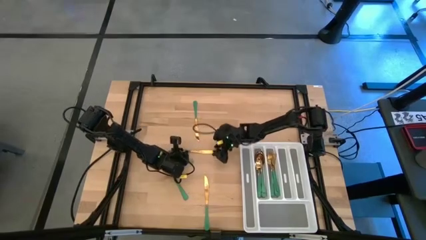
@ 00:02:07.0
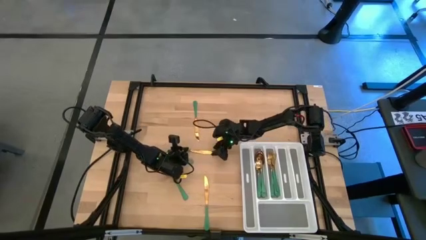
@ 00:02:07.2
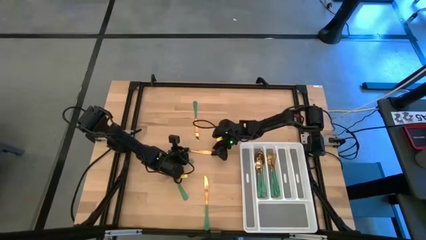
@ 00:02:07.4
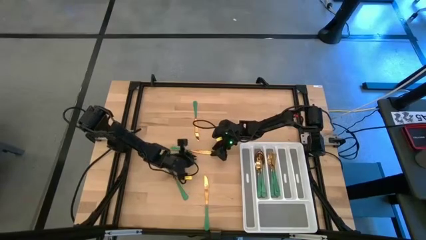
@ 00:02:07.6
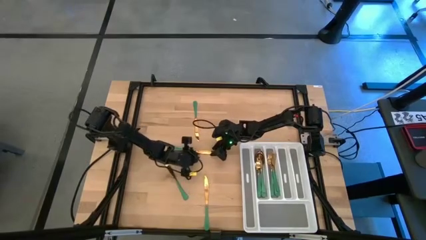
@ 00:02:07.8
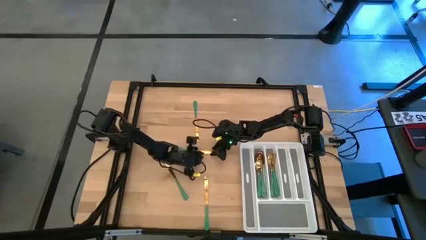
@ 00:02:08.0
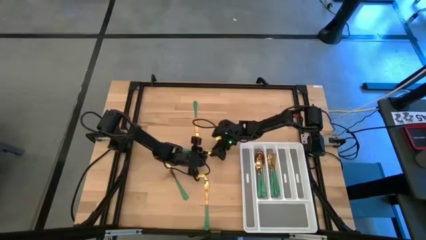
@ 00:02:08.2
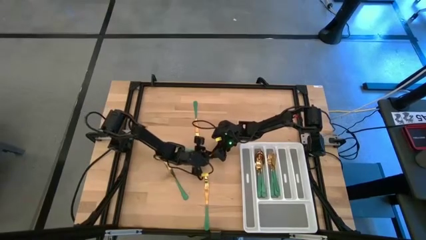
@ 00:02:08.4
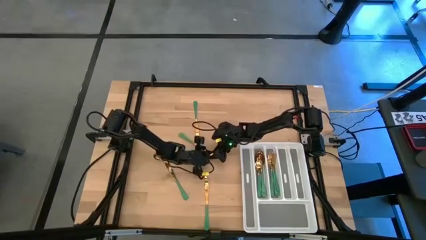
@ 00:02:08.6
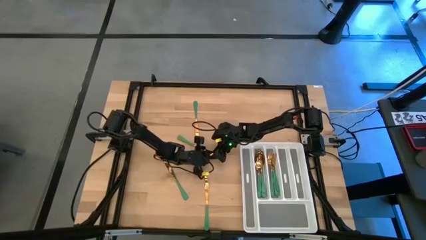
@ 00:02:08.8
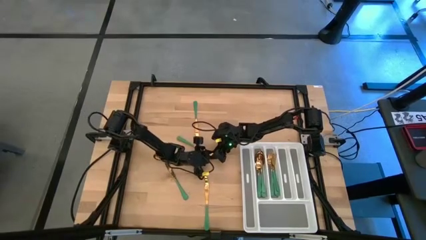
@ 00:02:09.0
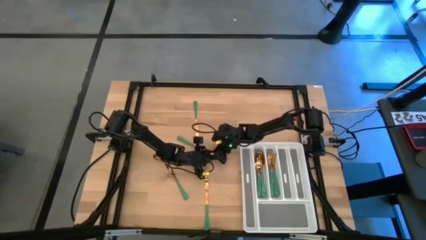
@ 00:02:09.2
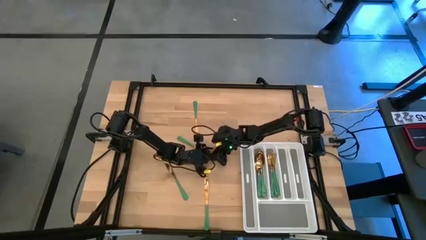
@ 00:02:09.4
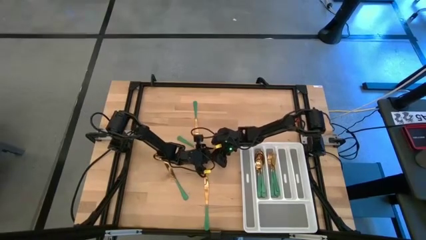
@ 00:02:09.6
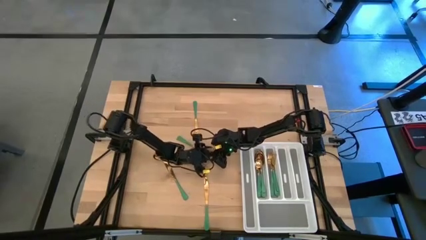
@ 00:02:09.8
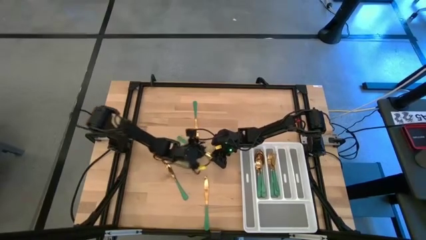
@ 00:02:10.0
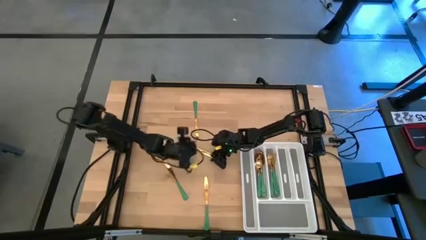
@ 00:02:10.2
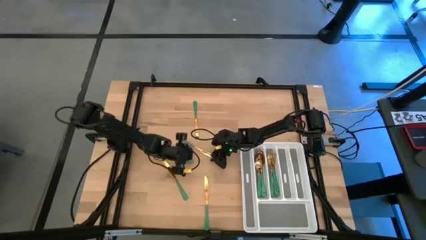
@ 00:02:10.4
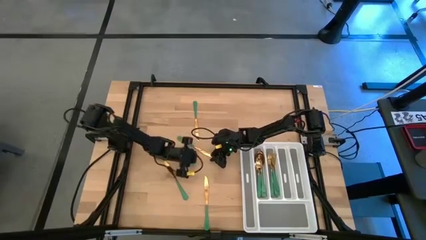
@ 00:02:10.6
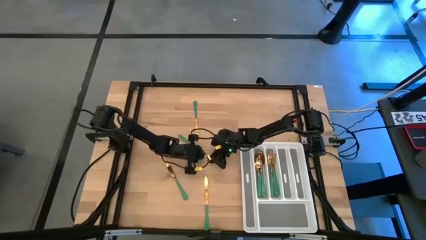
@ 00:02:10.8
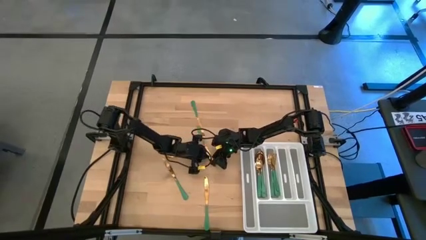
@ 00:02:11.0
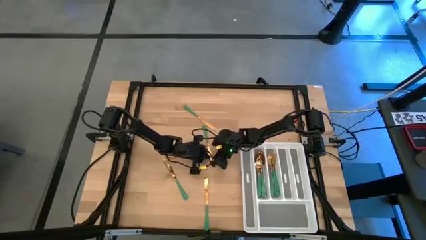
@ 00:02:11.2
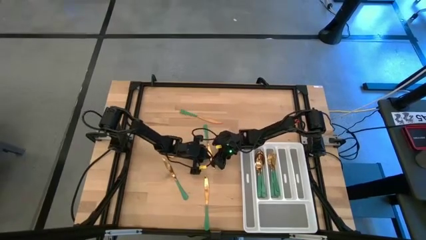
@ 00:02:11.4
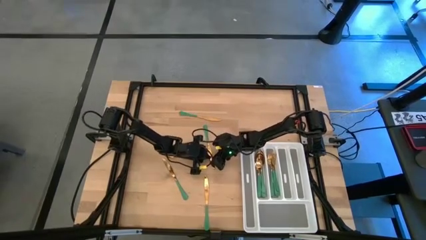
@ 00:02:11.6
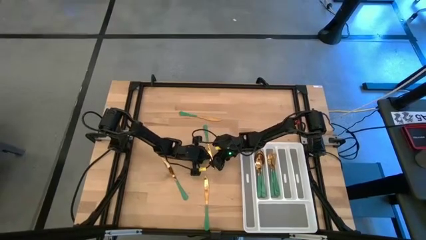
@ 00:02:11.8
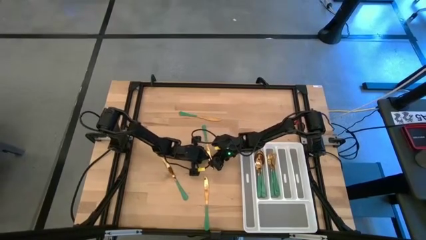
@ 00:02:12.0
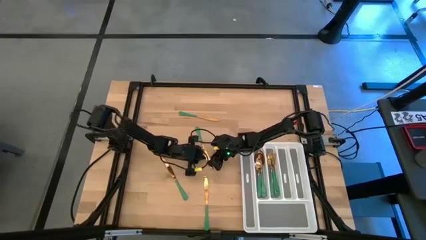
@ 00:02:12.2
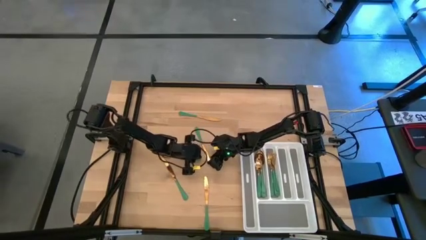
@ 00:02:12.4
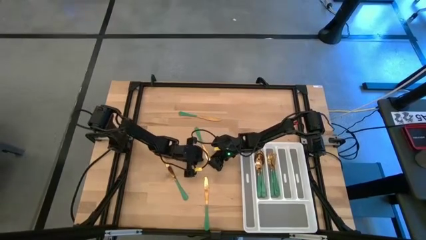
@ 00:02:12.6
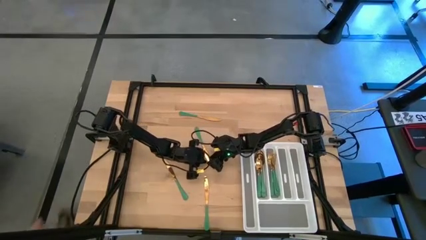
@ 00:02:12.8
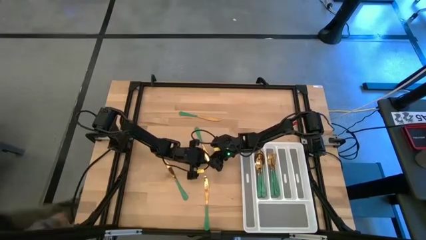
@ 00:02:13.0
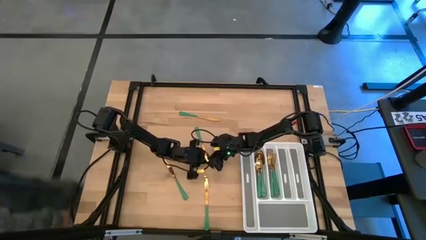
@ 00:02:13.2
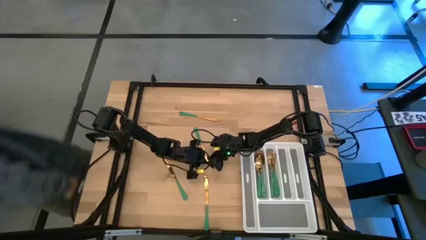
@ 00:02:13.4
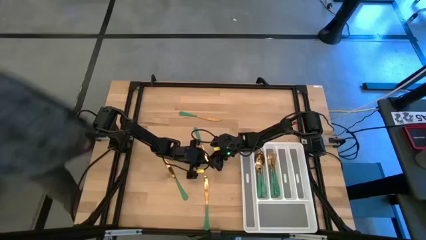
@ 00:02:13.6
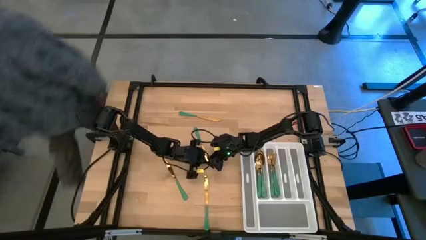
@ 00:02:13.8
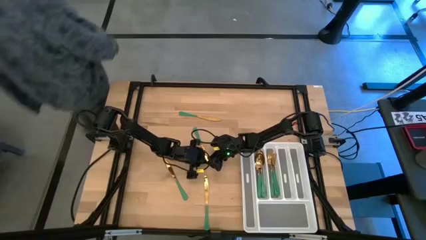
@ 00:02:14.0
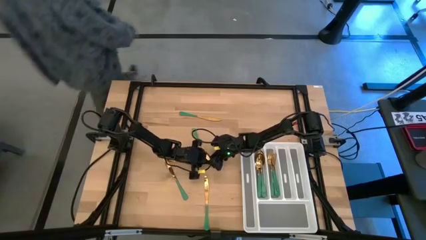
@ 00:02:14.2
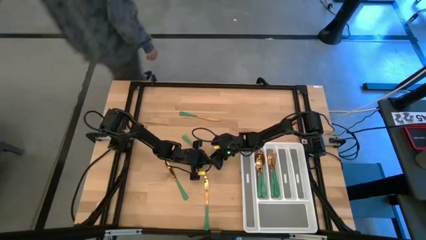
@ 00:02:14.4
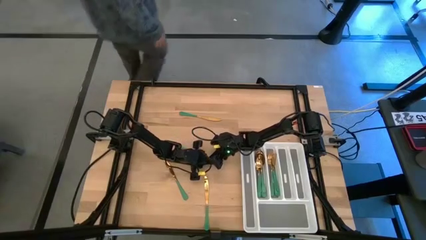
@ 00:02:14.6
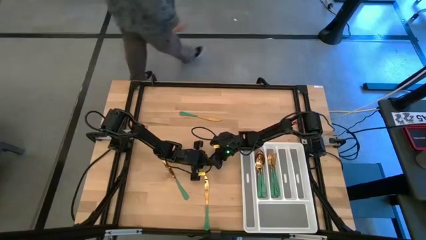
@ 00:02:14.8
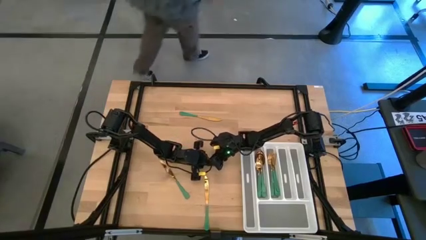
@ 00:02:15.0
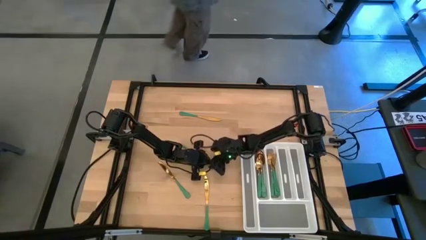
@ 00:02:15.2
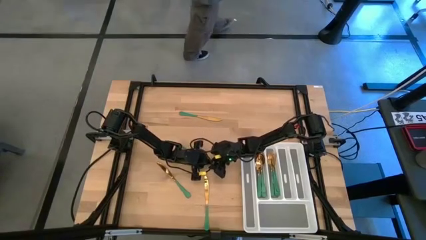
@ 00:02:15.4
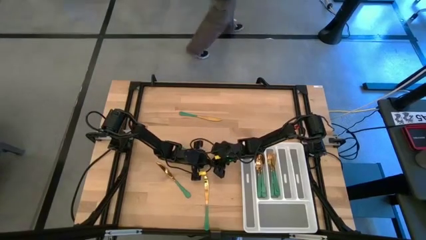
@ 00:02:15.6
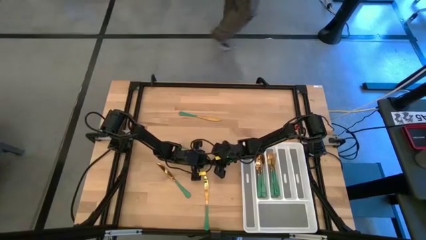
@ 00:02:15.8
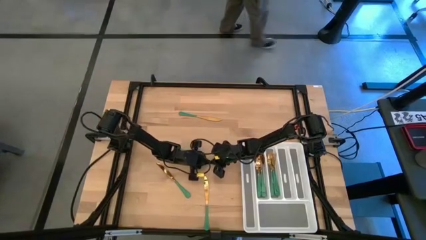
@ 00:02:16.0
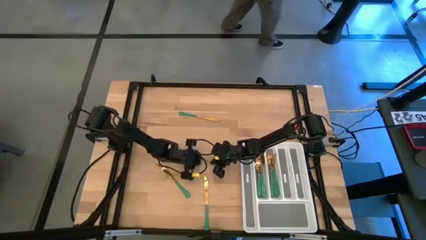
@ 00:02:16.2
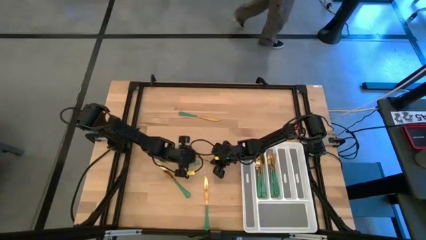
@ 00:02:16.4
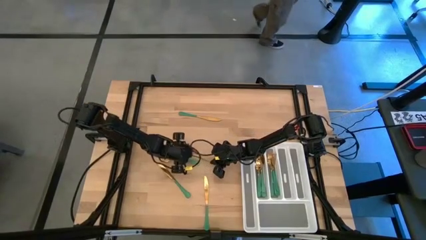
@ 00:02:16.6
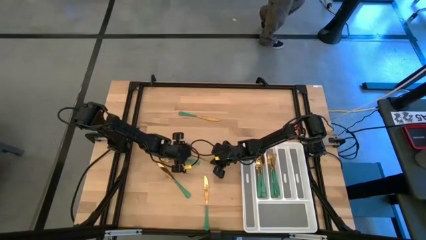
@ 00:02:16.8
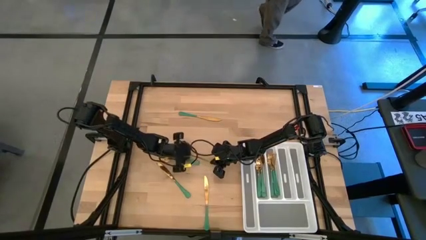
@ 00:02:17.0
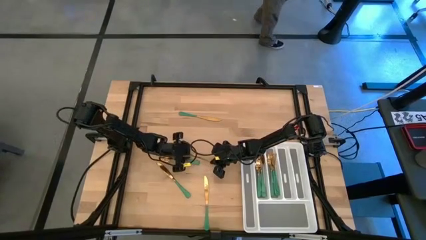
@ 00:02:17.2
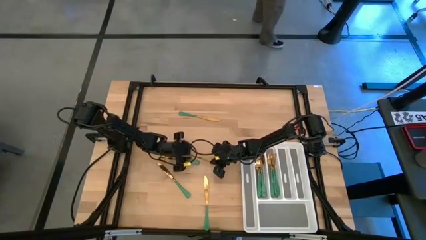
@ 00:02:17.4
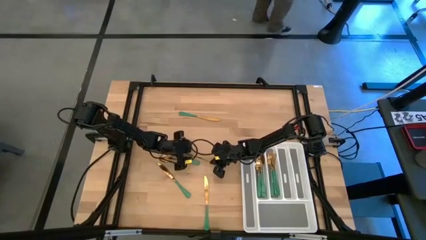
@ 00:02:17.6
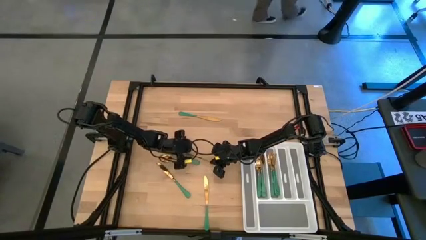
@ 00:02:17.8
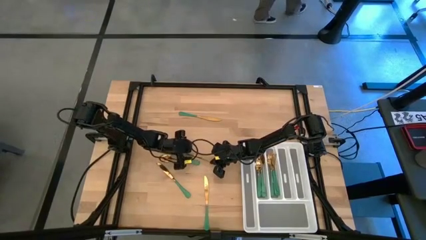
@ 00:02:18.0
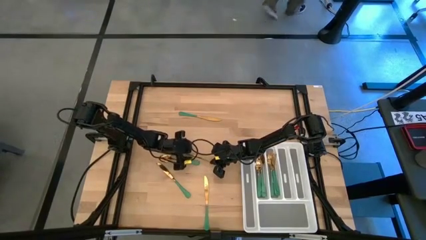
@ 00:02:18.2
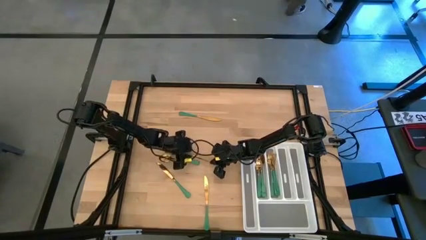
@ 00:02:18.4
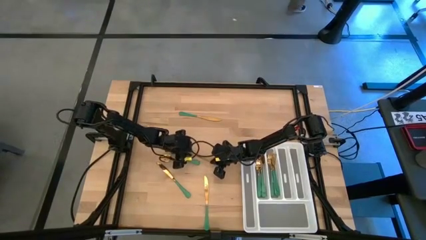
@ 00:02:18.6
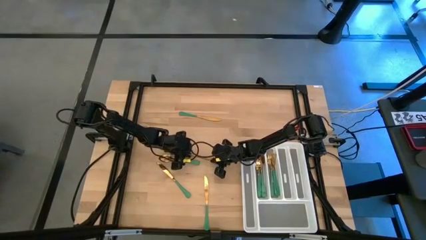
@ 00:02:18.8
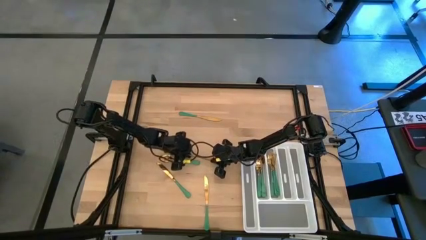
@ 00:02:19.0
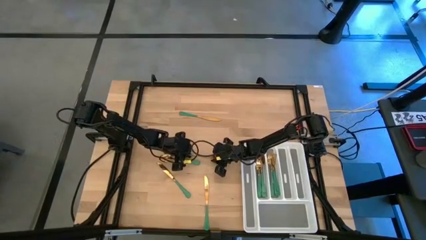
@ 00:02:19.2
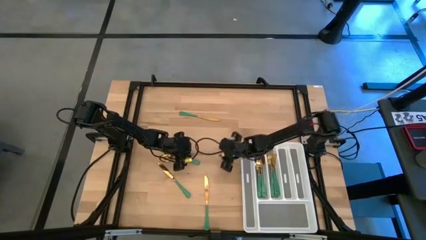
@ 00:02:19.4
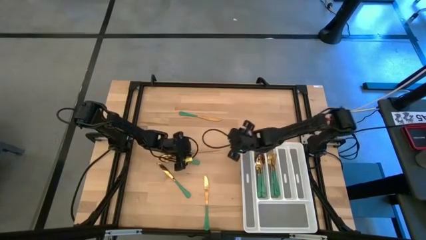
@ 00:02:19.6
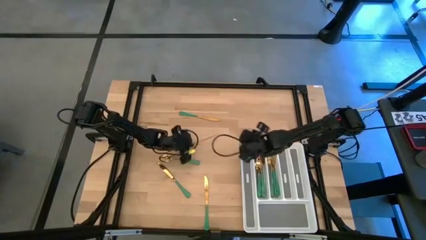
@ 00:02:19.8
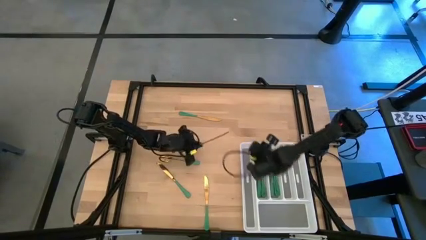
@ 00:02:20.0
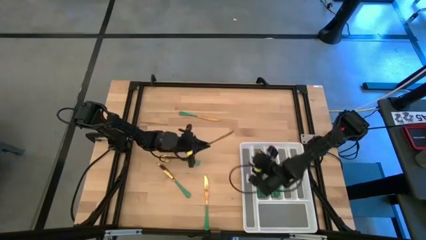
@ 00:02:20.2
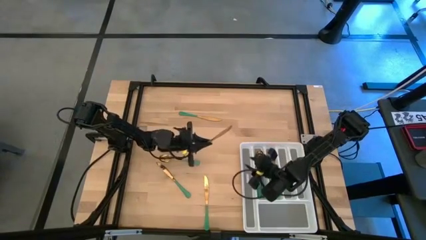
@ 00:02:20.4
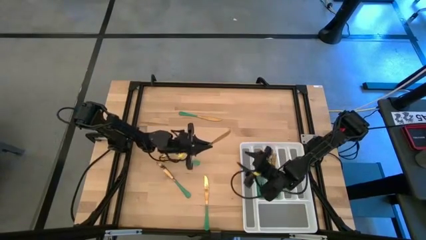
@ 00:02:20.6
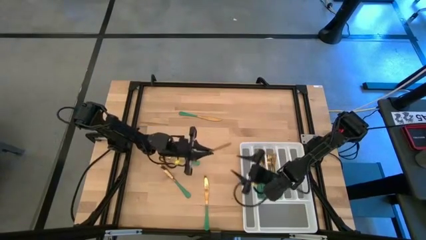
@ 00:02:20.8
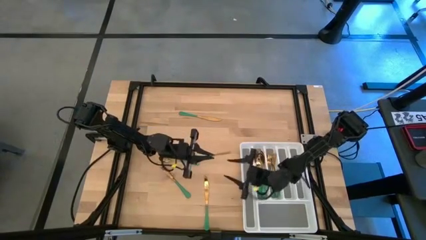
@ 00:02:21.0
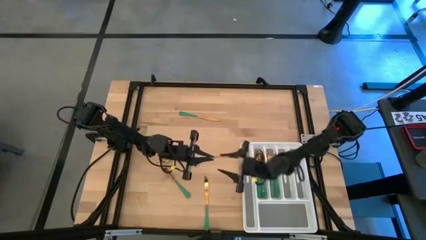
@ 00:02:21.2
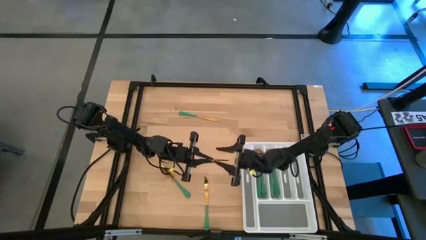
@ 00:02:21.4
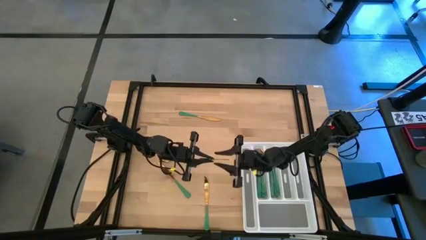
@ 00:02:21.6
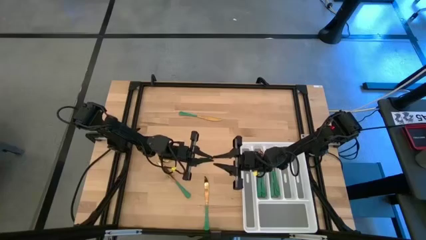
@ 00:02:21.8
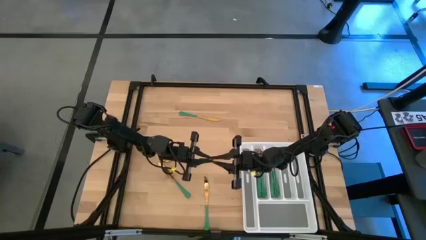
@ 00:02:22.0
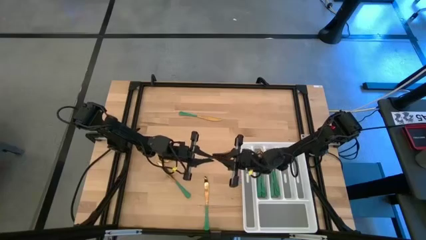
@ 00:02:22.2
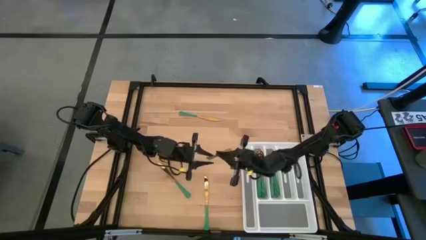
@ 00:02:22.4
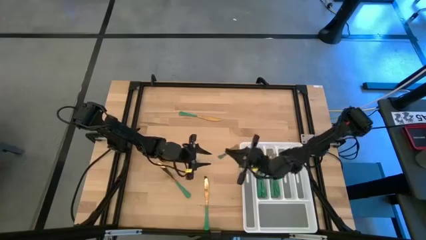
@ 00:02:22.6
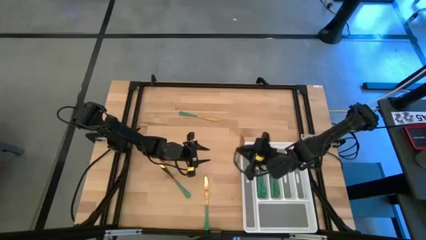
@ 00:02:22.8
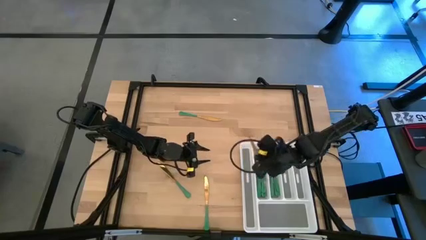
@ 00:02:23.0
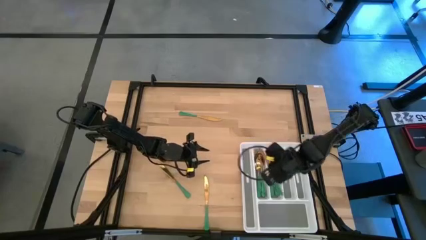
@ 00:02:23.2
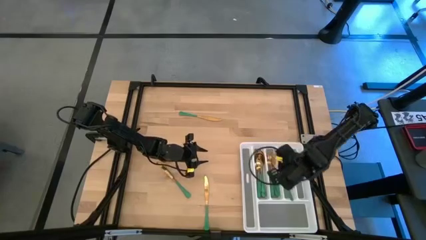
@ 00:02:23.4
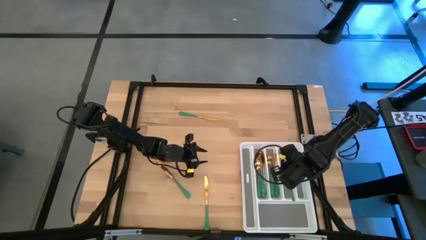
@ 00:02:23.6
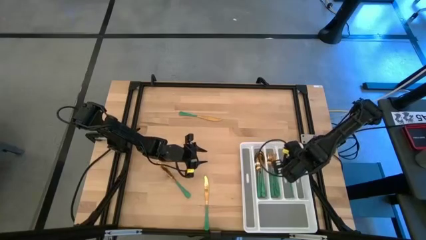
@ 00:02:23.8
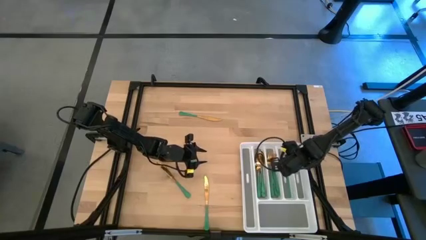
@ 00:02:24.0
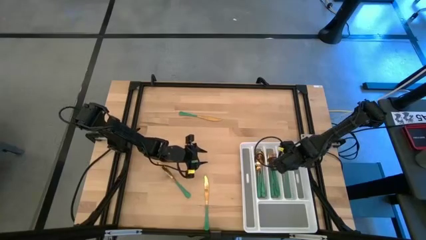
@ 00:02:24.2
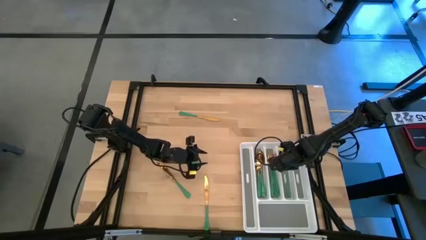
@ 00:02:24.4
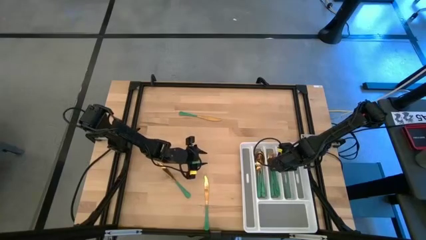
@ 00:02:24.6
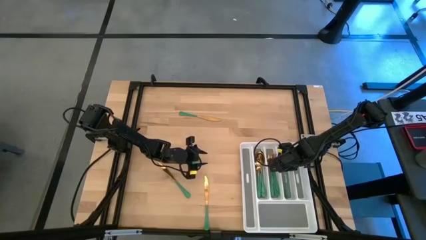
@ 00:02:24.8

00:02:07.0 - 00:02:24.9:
Task: Sort silverware
Put the middle right green knife into the silverware rack
